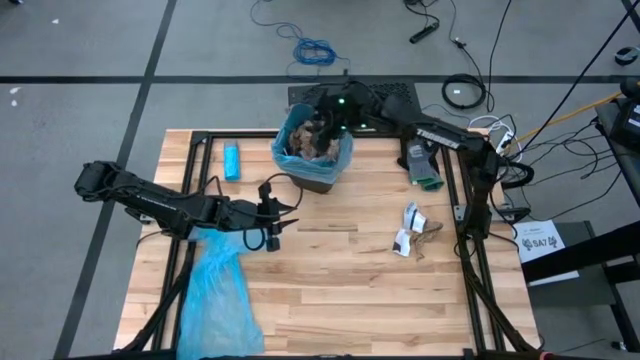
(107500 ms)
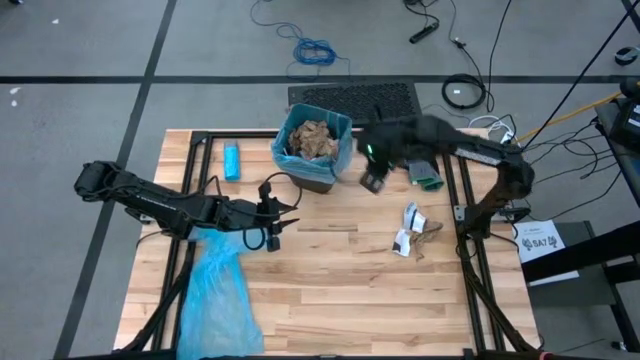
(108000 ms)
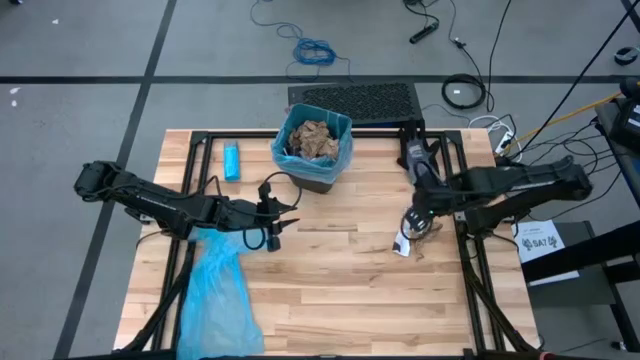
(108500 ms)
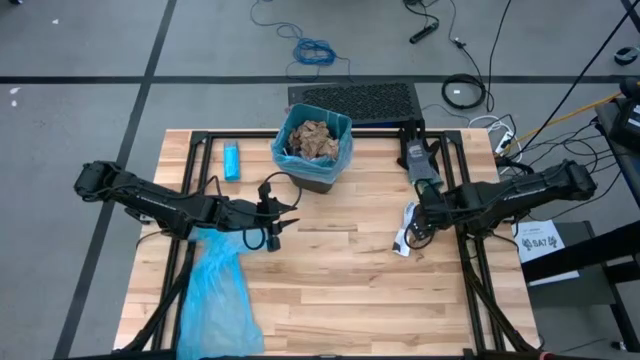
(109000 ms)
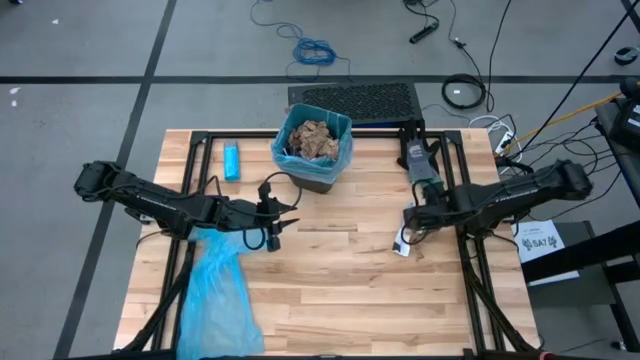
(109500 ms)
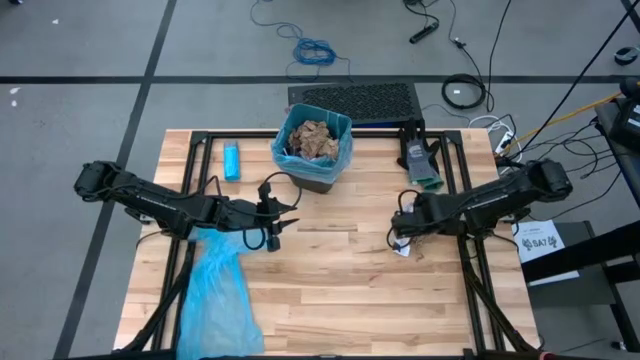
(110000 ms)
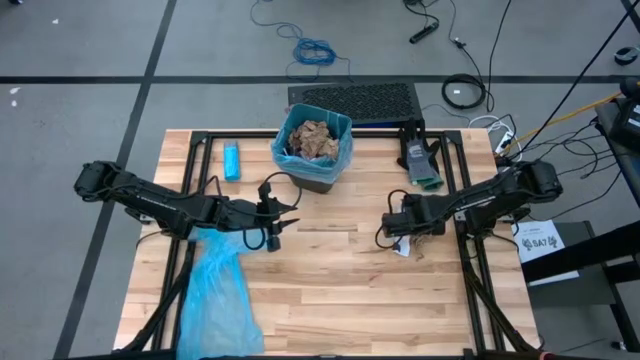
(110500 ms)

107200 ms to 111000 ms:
Task: place trash/remove bag and relplace
Put the white paper into the trash bin

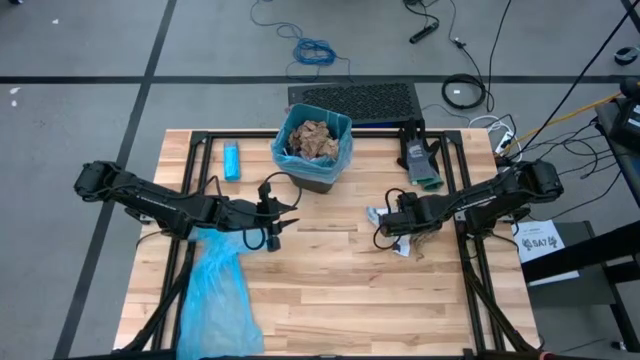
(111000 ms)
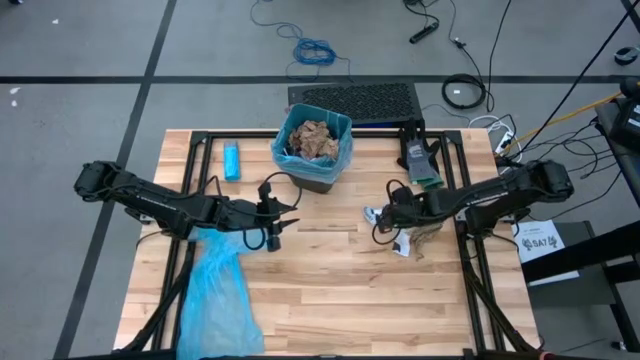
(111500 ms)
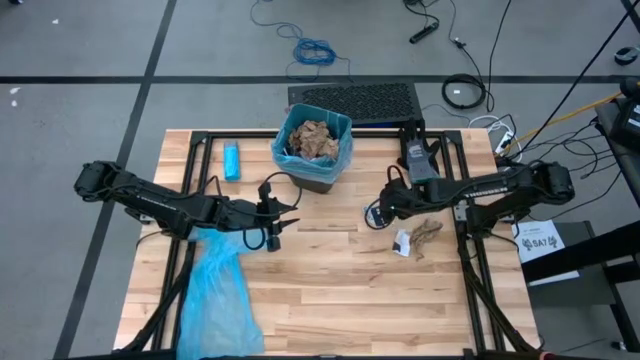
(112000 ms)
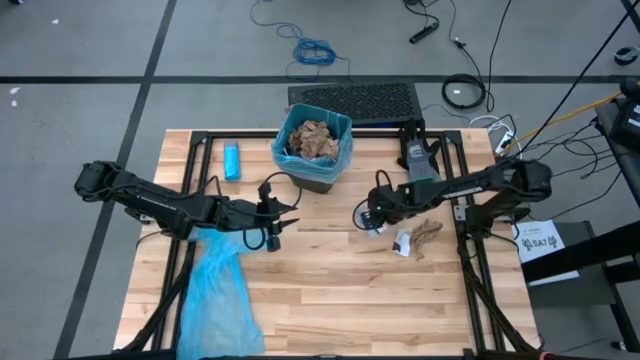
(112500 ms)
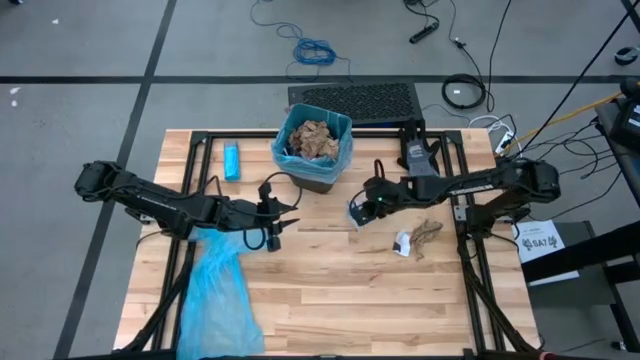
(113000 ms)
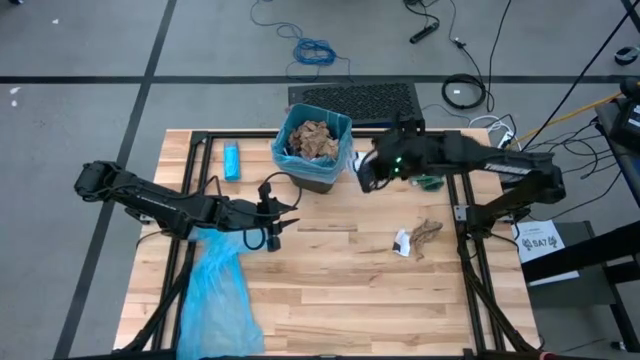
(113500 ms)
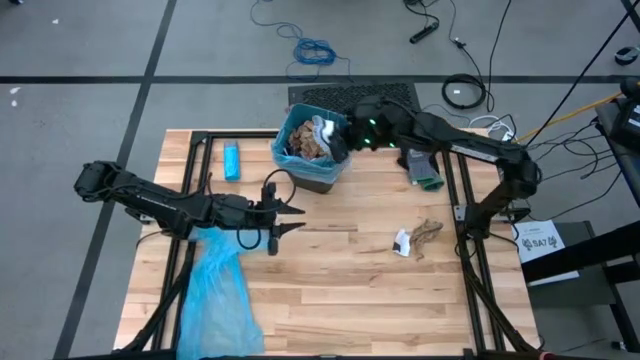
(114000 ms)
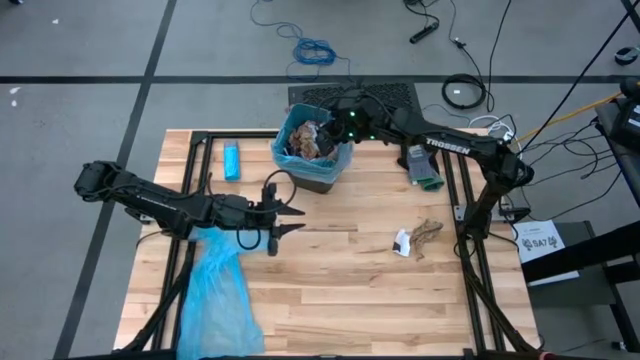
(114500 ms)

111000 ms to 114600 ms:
Put the white paper into the trash bin

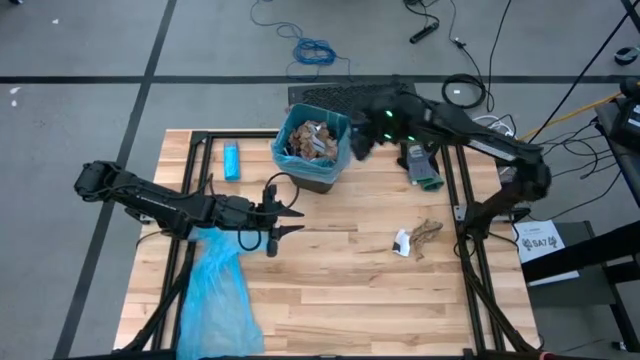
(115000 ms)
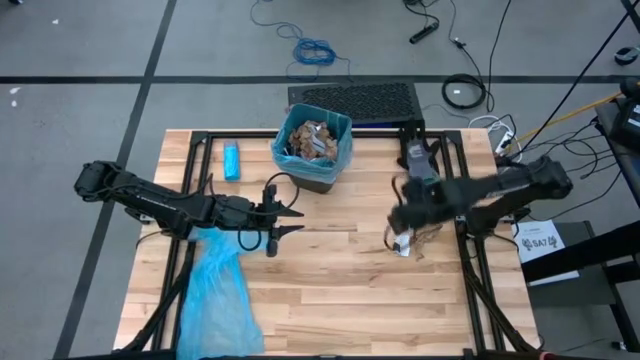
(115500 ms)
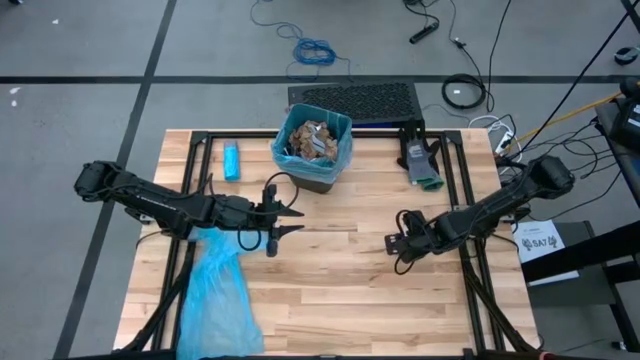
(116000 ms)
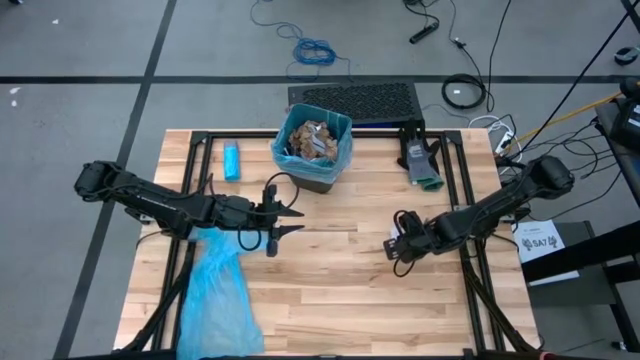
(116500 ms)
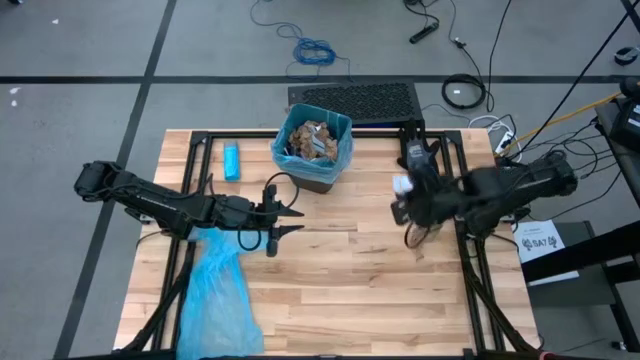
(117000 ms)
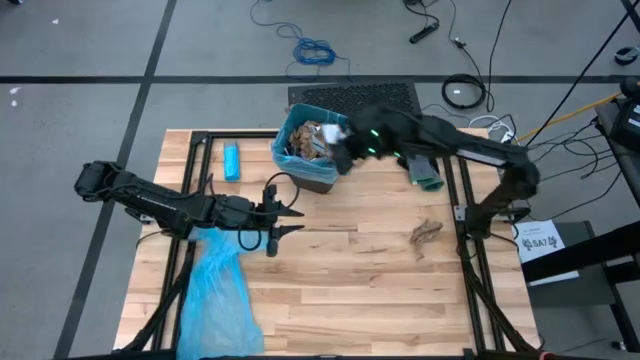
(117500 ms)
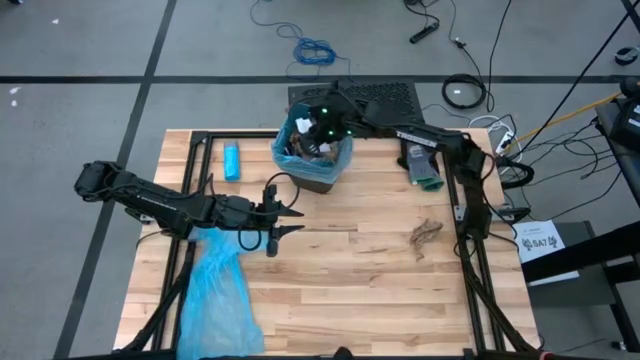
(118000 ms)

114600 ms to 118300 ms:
Put the white paper into the trash bin

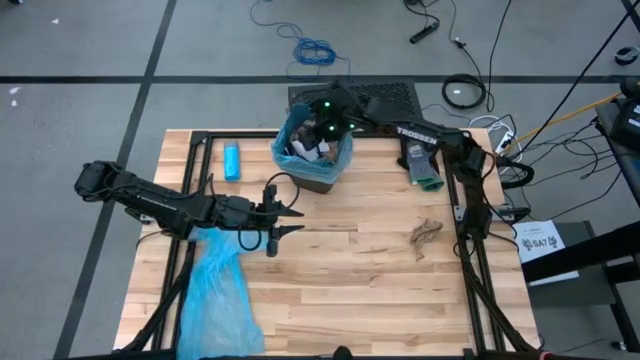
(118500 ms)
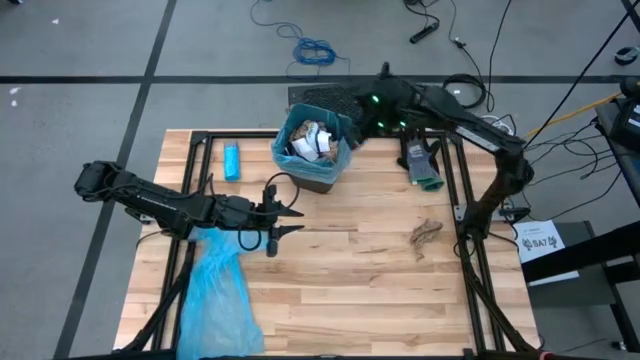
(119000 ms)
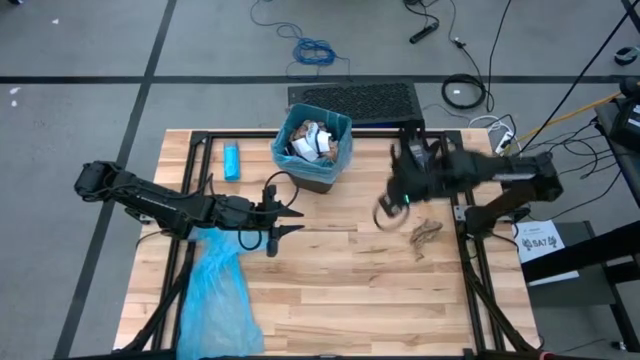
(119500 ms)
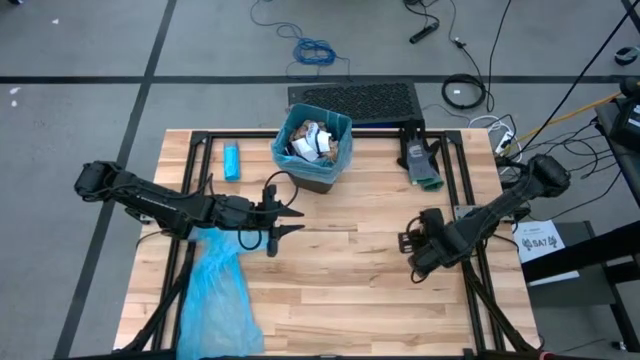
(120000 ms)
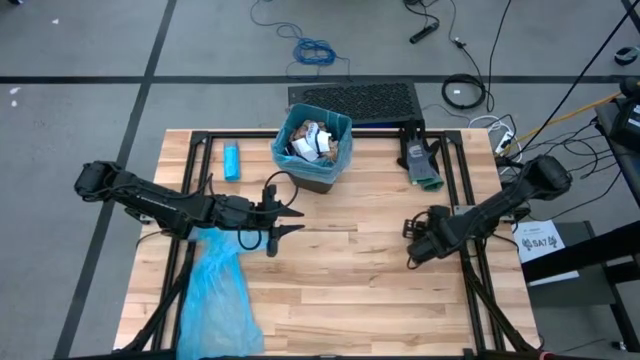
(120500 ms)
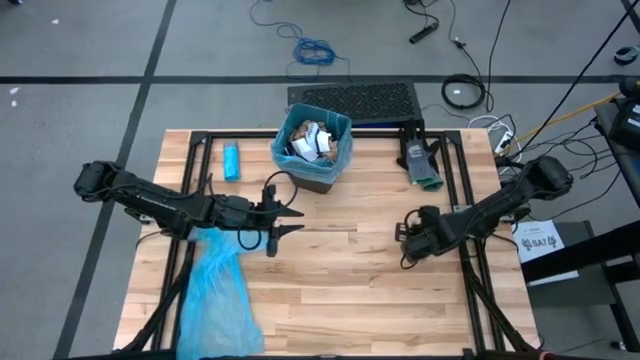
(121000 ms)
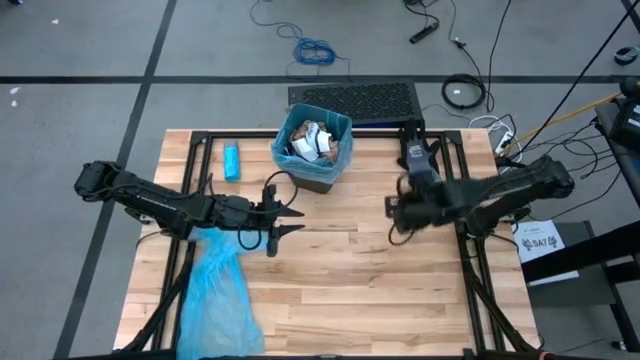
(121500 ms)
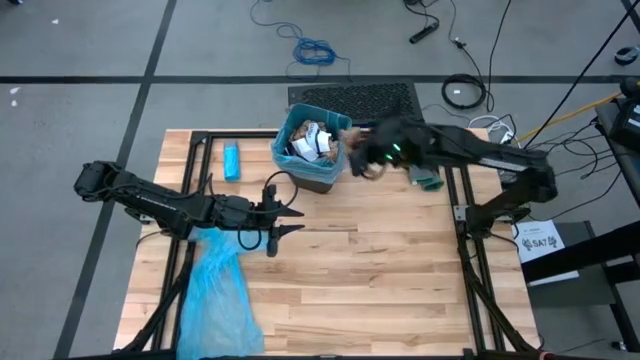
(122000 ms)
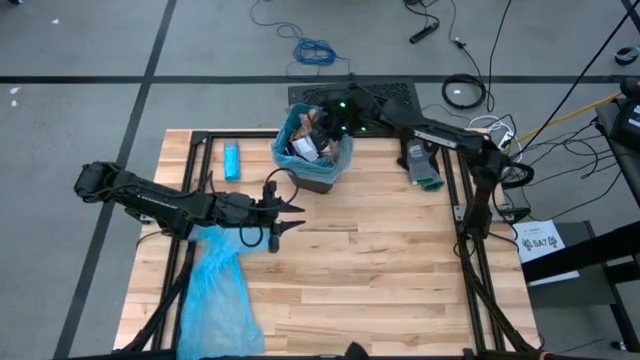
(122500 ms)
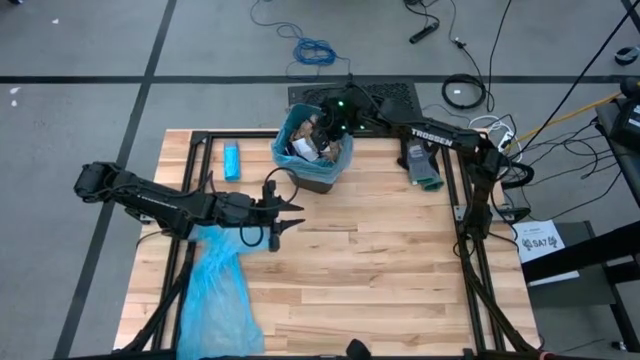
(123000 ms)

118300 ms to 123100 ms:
Put the brown paper into the trash bin

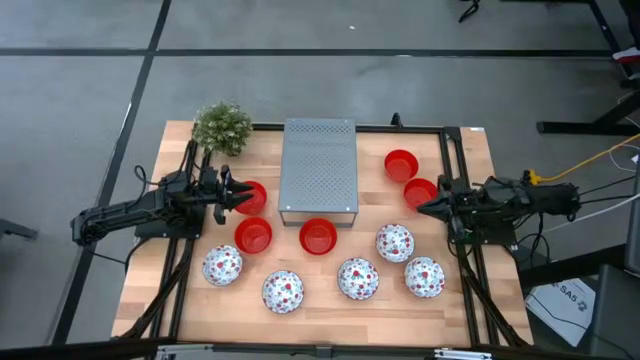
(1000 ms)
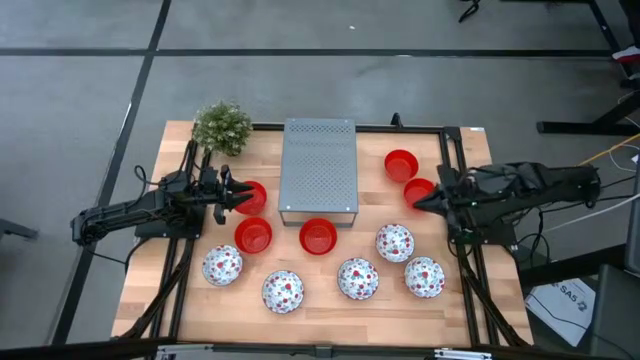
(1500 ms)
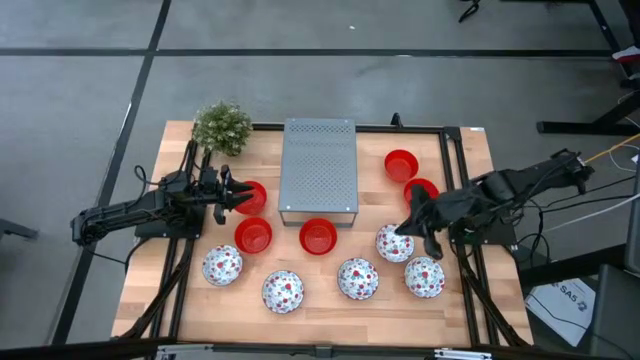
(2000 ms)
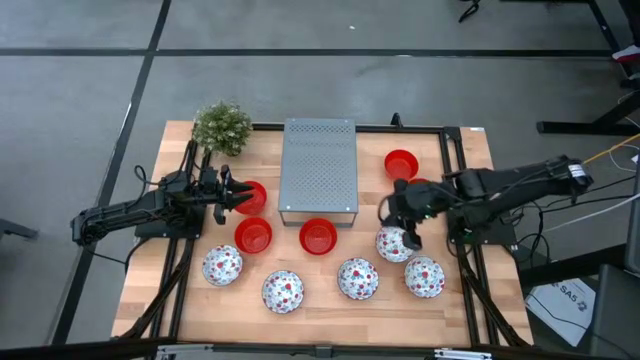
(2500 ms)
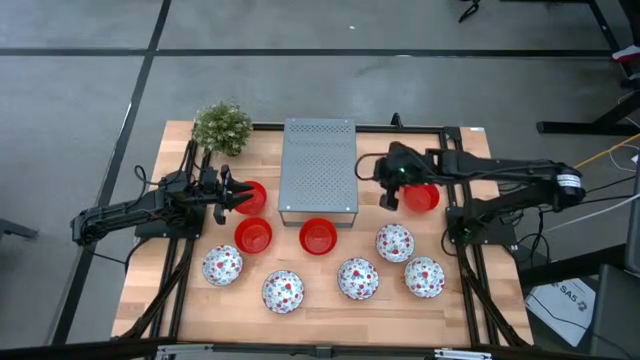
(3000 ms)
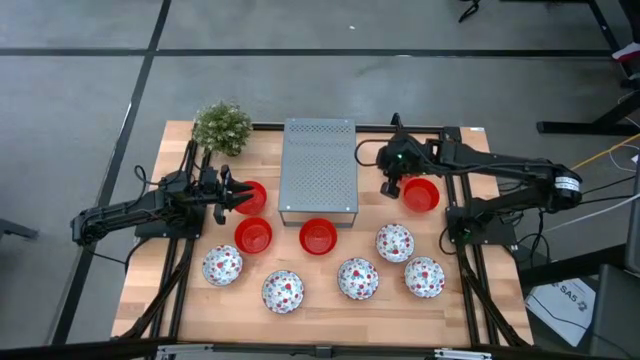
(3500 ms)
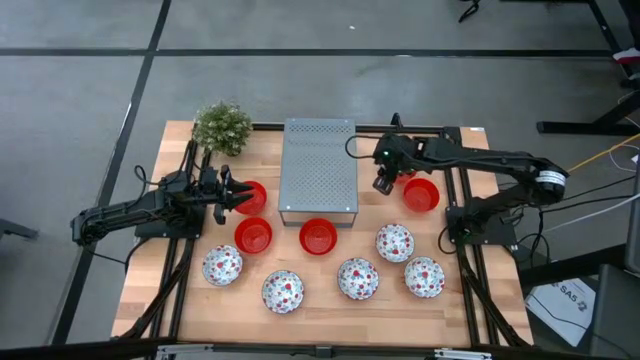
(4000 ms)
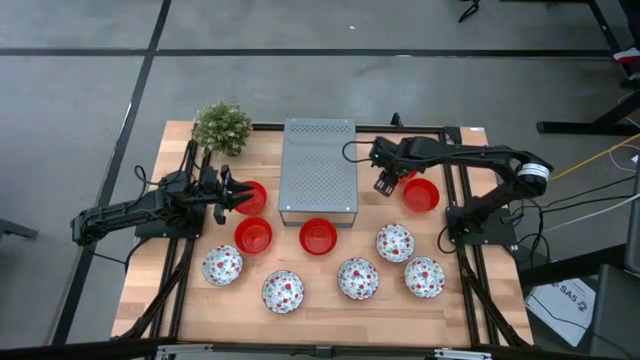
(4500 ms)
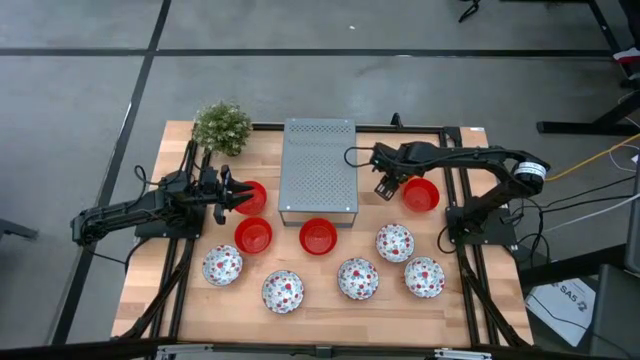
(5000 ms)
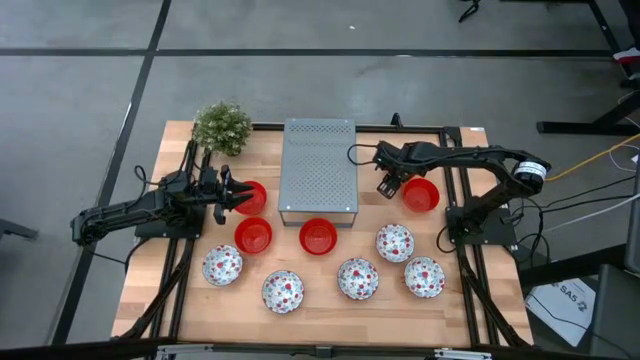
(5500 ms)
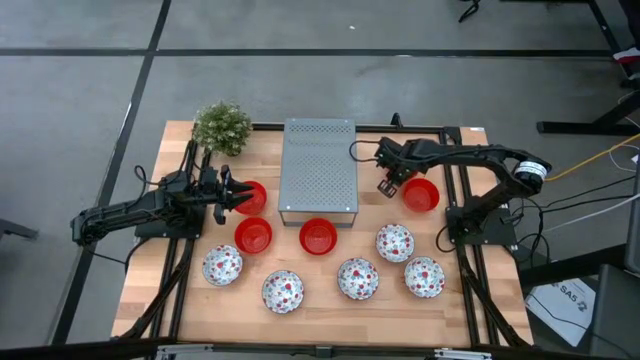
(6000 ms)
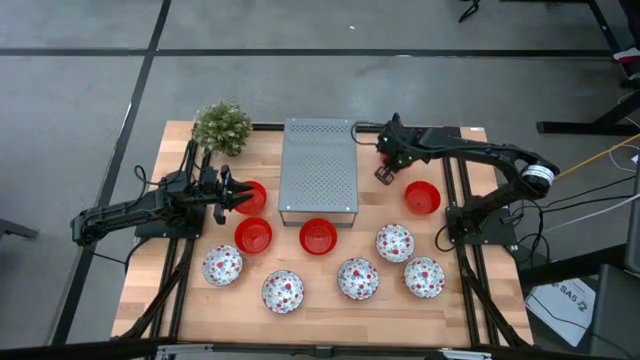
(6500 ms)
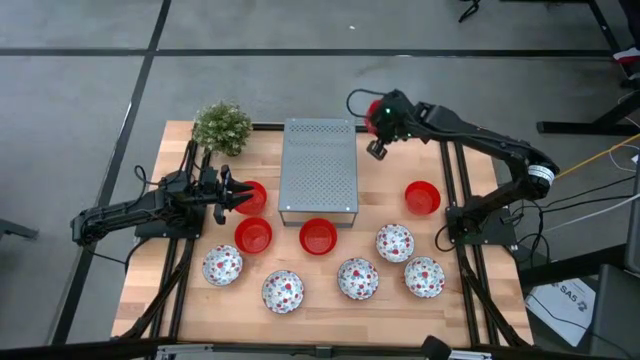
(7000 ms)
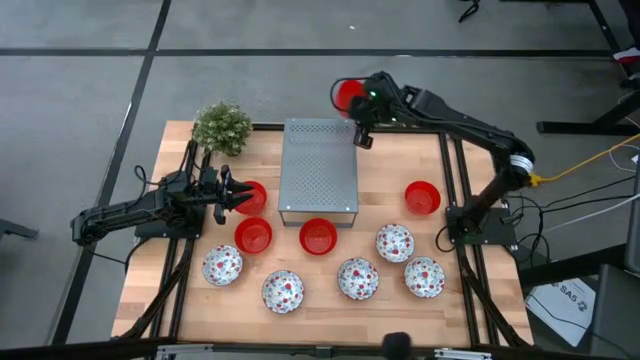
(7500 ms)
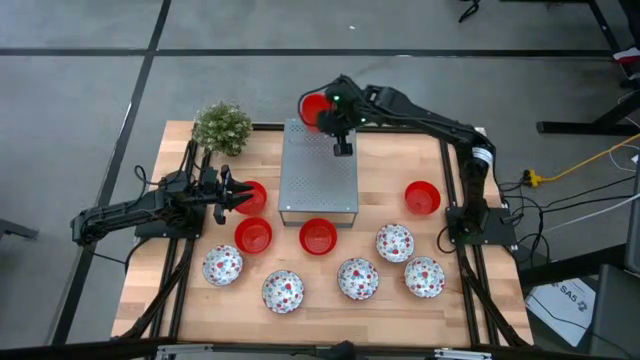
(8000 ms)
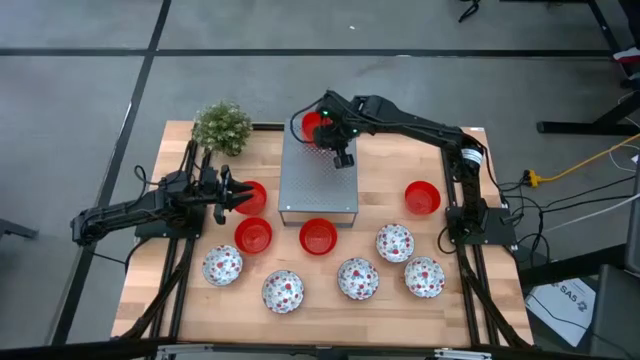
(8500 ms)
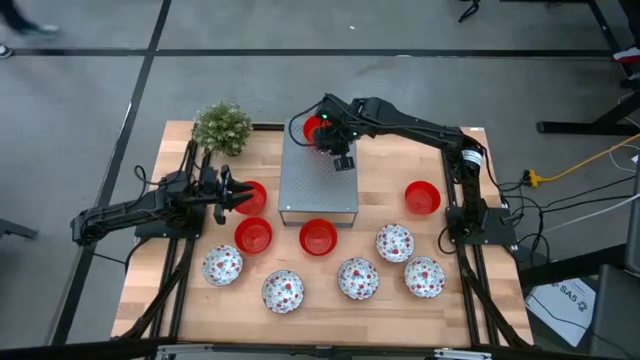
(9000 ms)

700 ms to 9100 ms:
Task: Pick & Place Mini bowls
Put the red bowl on the shelf
